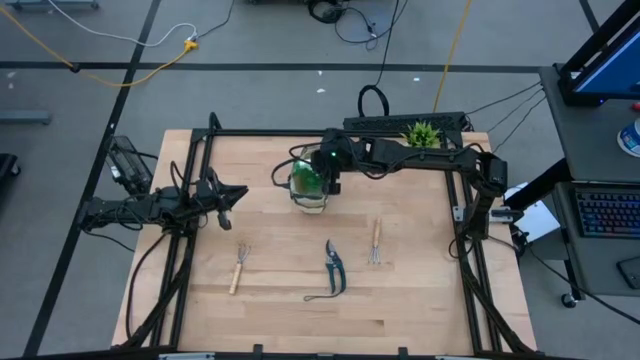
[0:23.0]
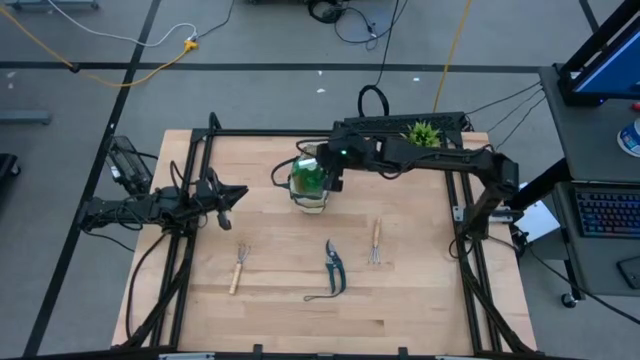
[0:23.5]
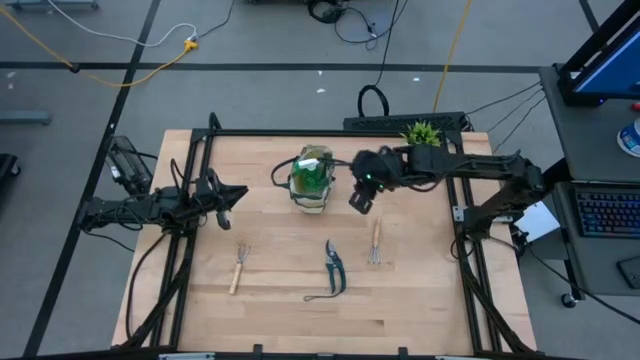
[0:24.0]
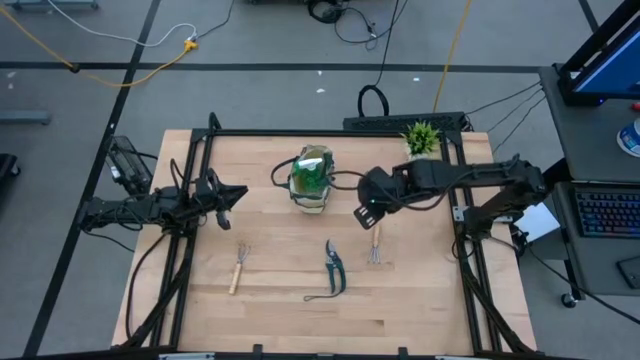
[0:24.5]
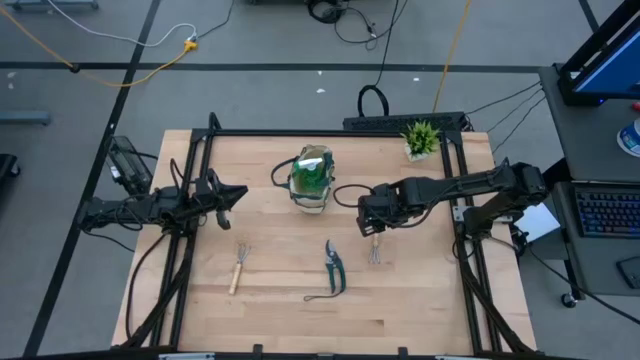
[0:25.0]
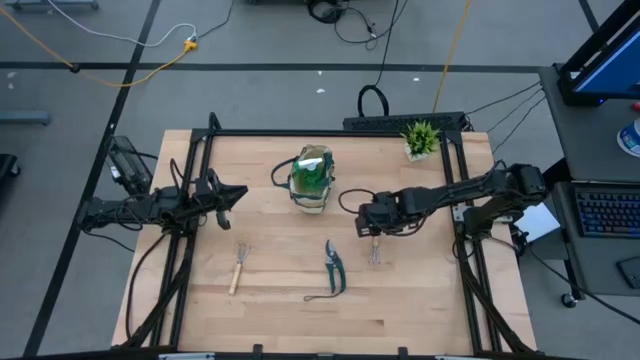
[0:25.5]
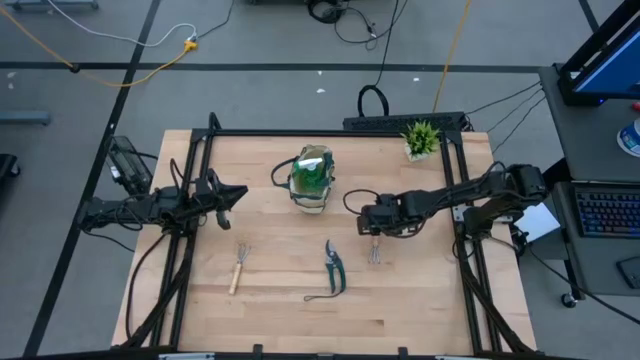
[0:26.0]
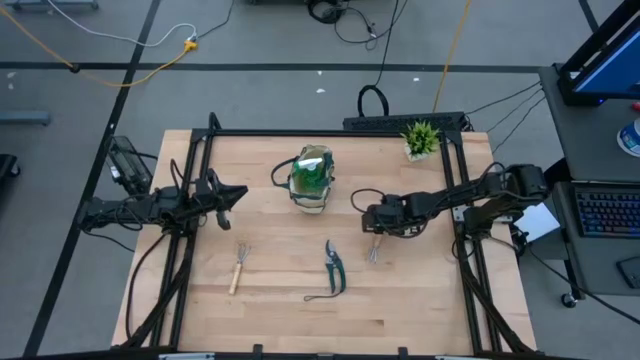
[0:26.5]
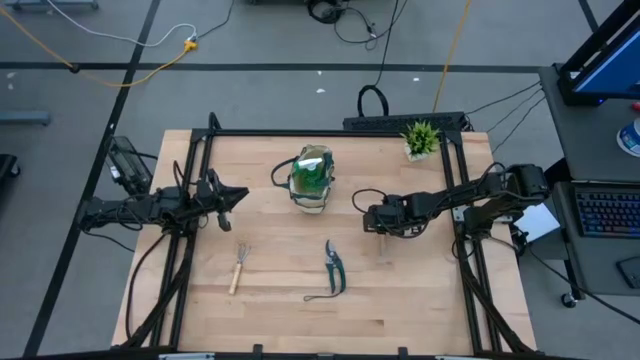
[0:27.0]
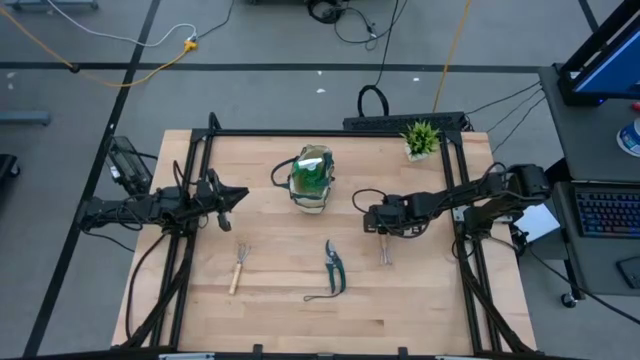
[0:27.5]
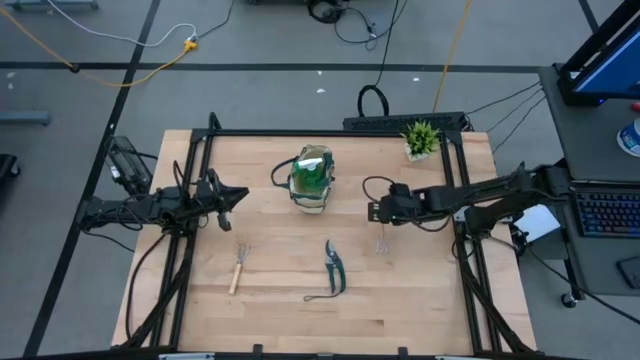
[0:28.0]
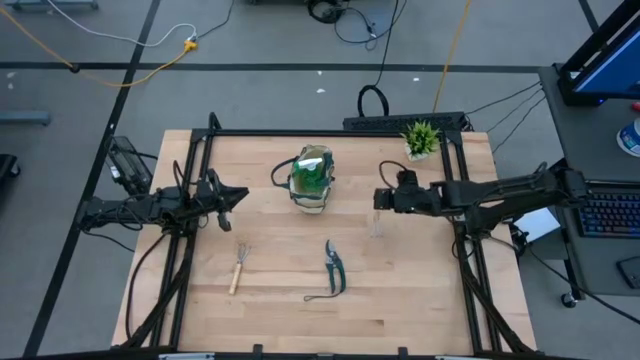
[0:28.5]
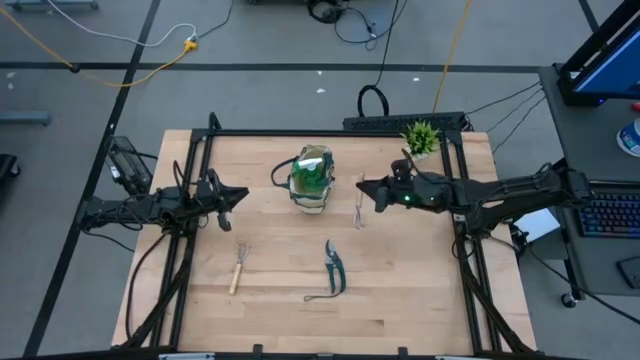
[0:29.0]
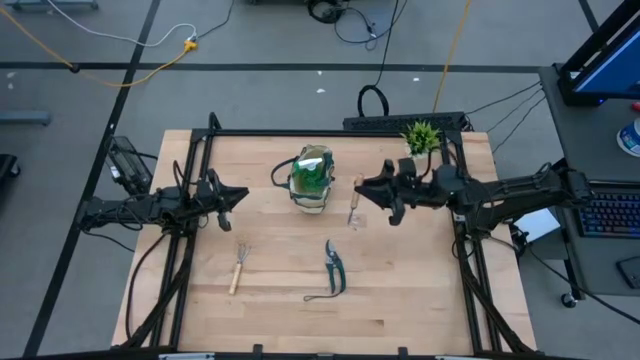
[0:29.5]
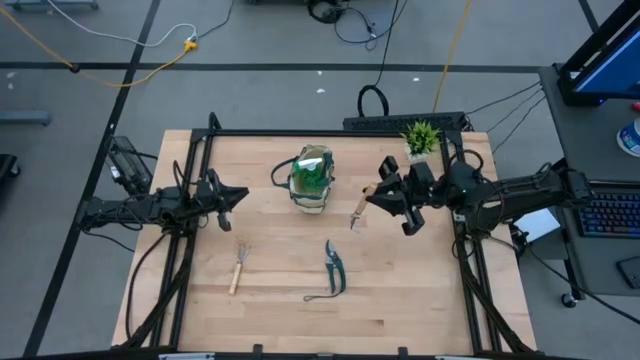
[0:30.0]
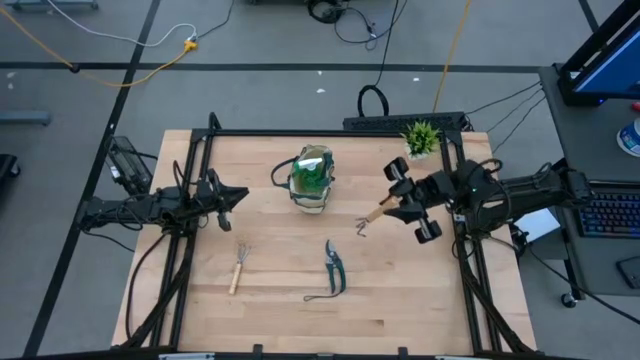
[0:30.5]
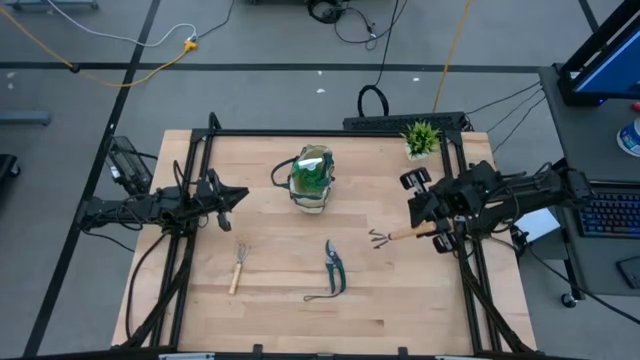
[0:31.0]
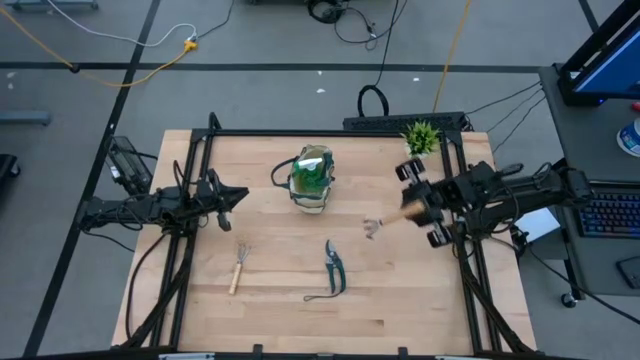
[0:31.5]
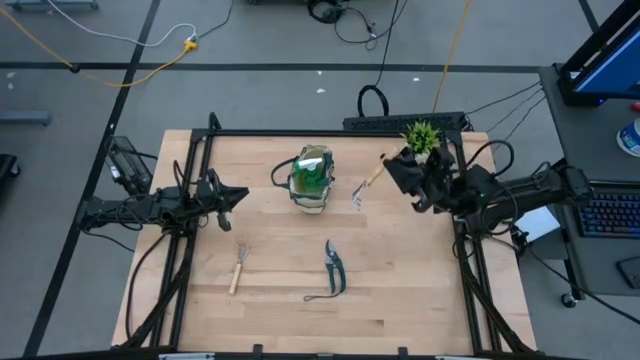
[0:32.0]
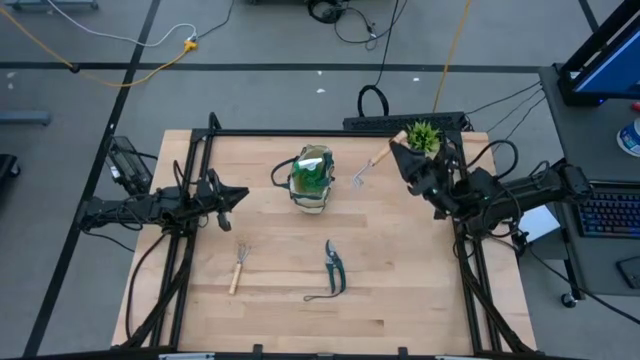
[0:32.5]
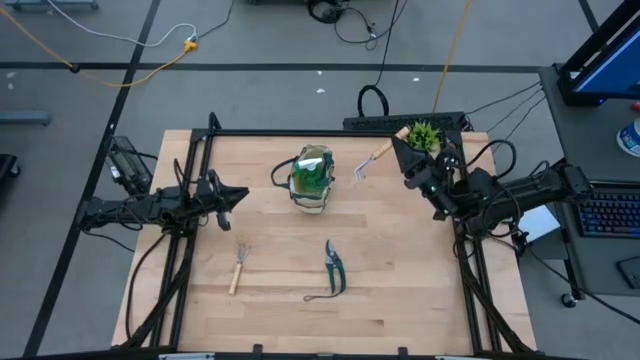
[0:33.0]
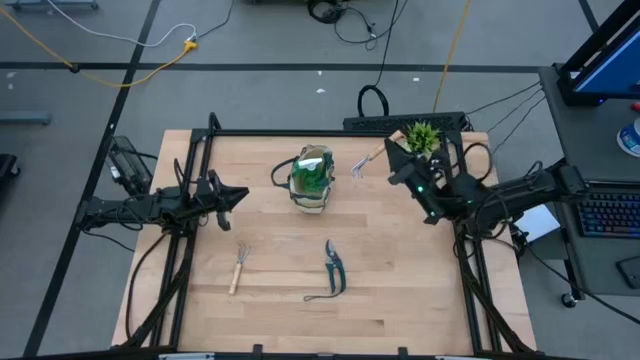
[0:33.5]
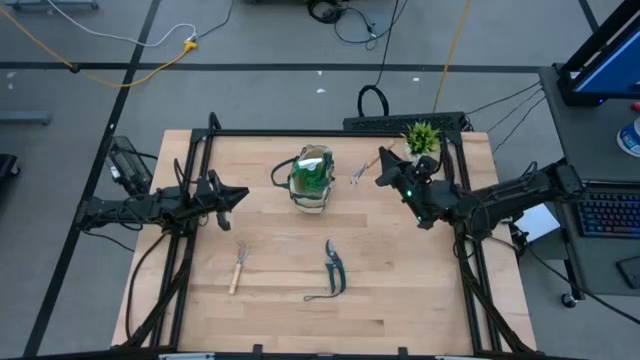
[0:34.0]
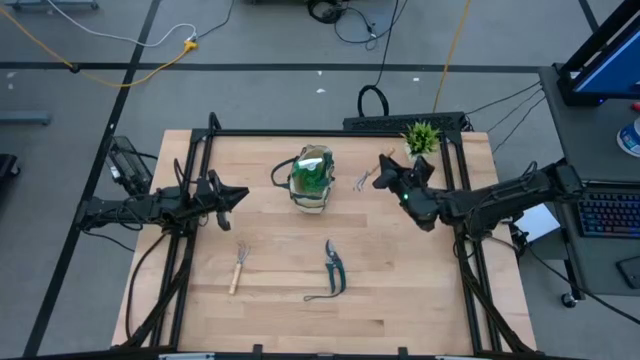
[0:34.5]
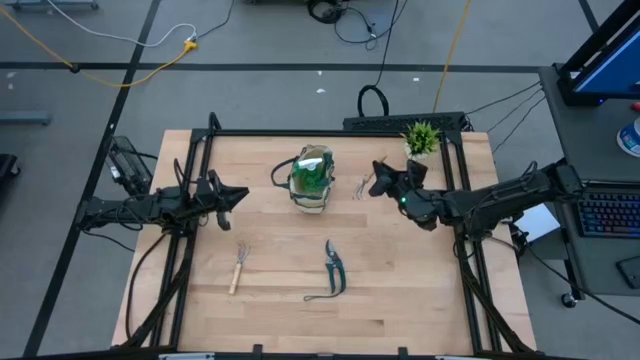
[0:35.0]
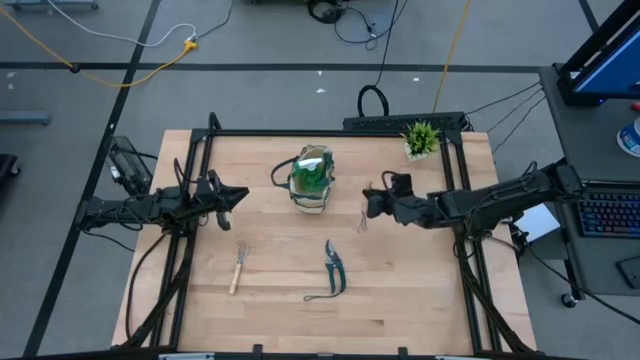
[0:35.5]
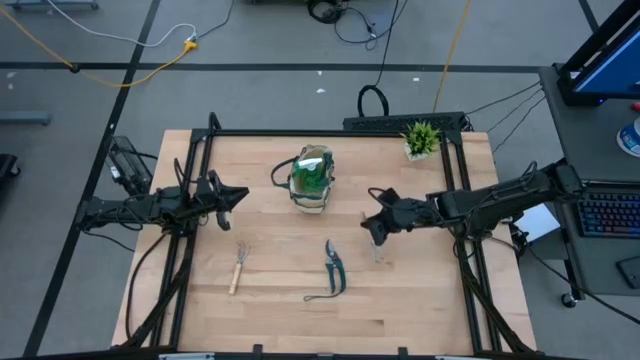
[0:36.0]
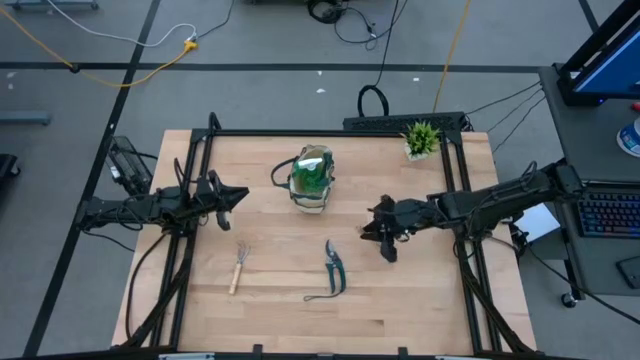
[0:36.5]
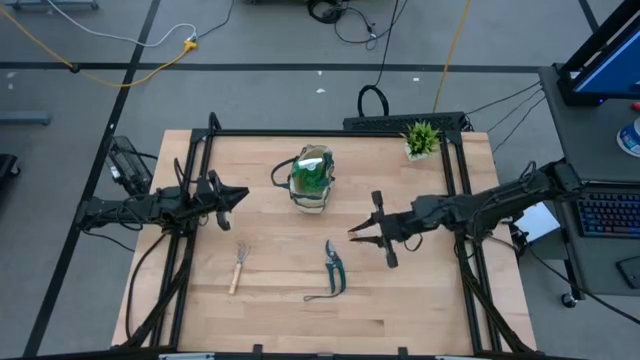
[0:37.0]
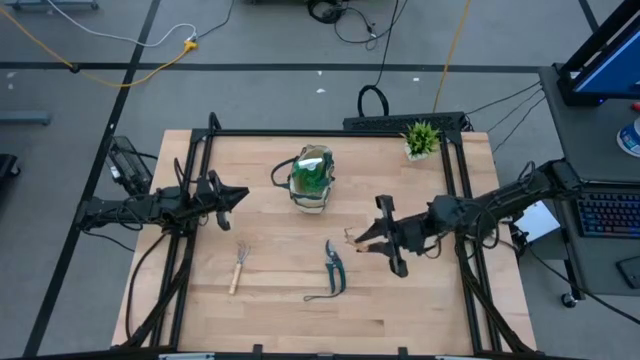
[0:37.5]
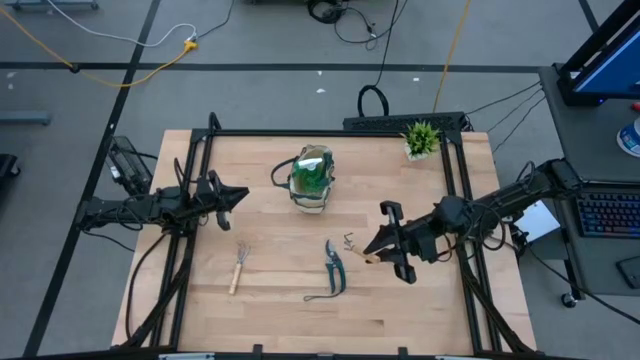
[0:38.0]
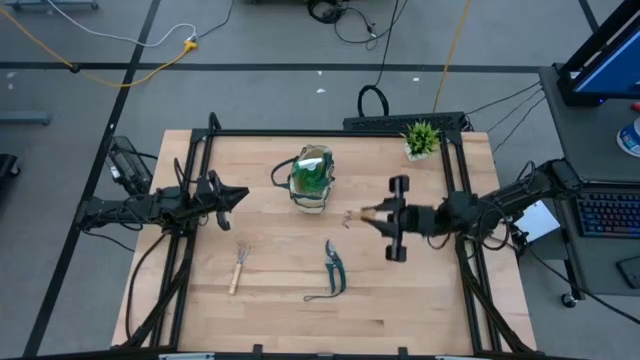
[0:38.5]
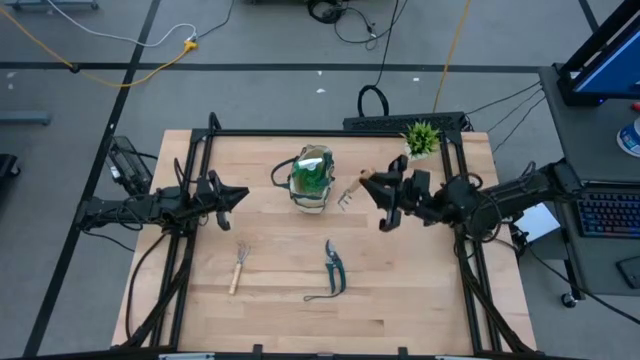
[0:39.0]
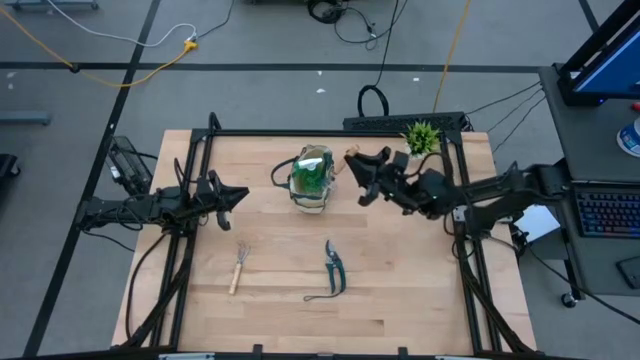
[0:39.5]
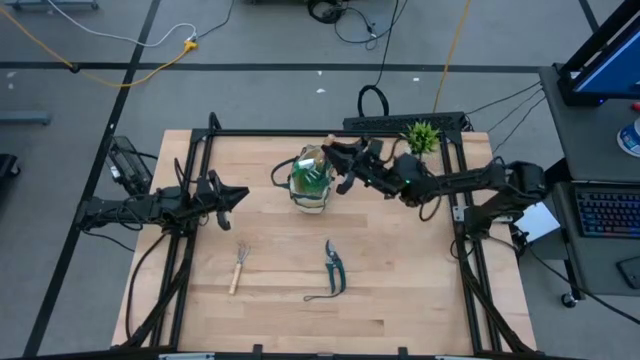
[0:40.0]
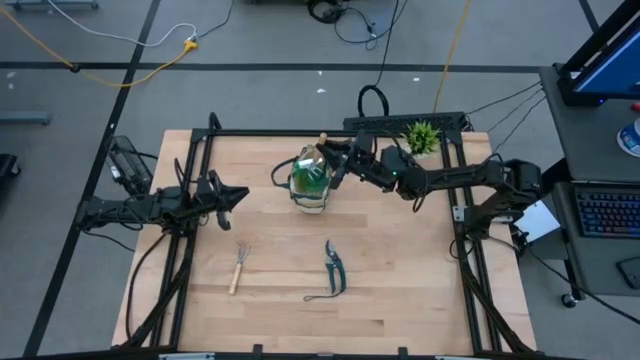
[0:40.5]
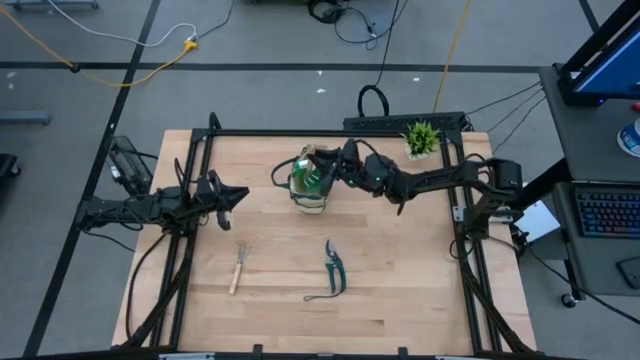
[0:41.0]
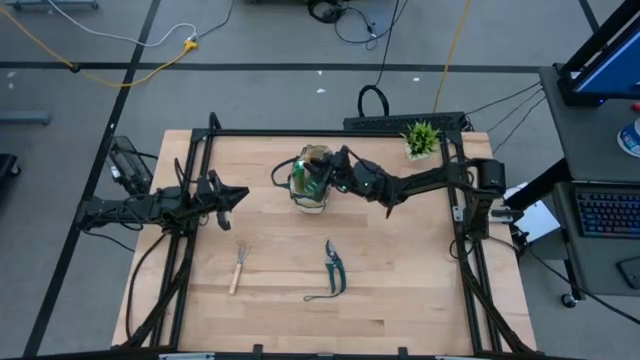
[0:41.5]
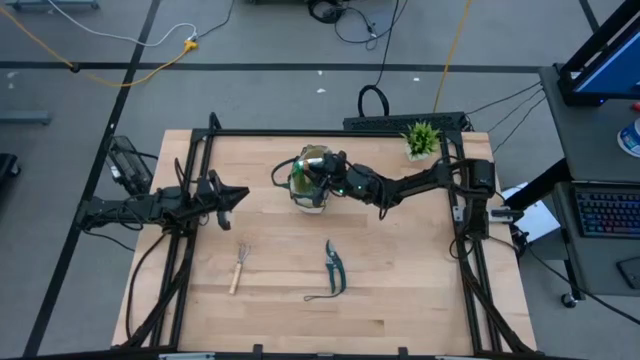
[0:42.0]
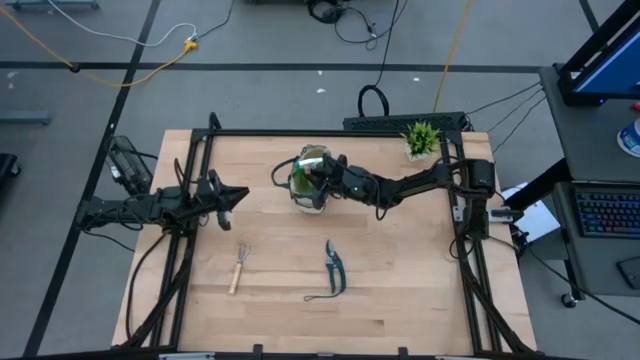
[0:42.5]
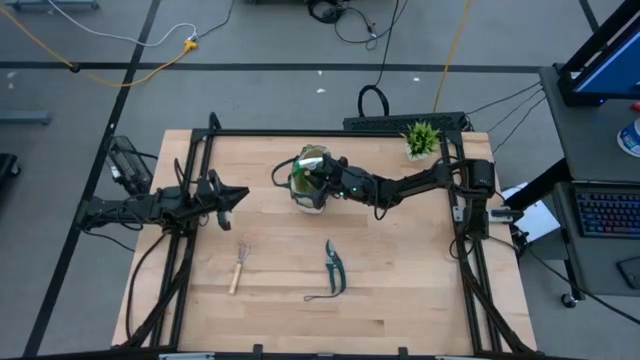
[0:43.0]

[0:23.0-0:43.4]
Task: Pick & Place Garden tools in Gardening bag
Put the right hand rake into the top gardening bag

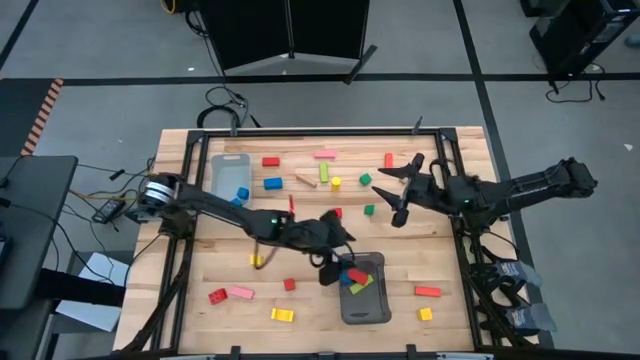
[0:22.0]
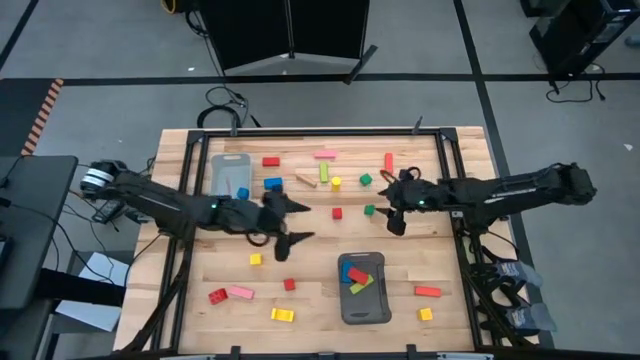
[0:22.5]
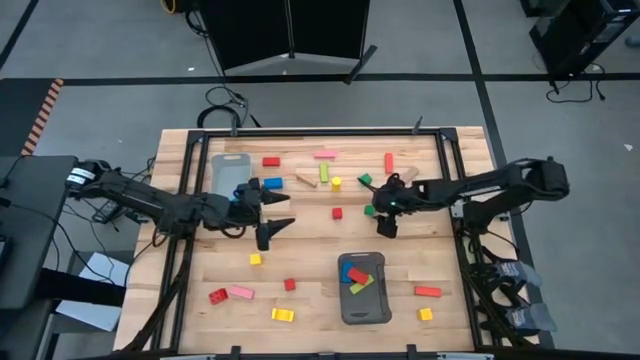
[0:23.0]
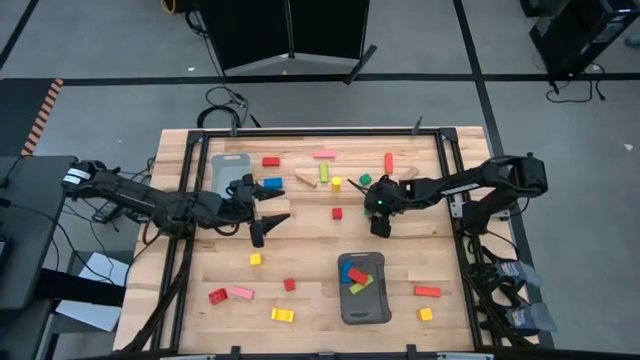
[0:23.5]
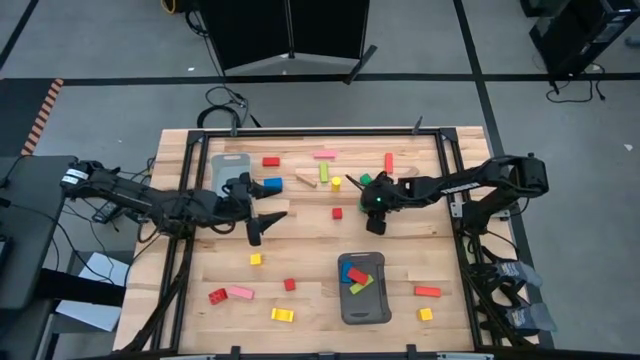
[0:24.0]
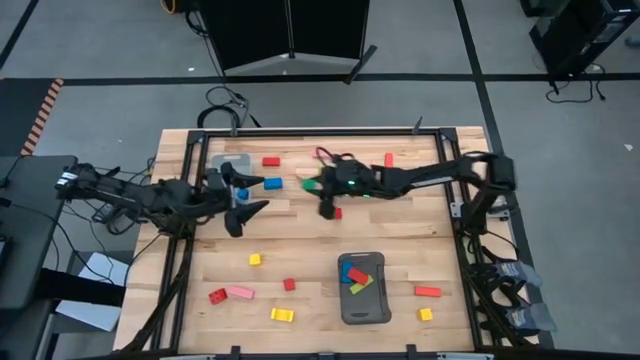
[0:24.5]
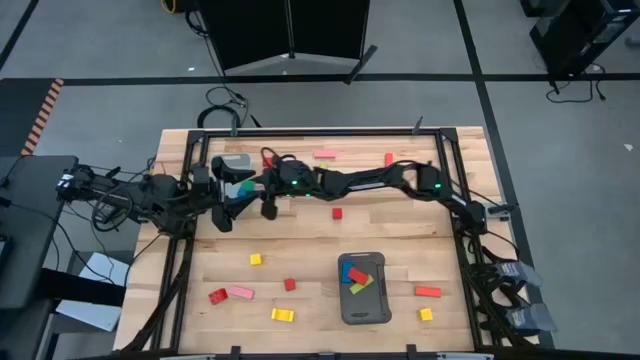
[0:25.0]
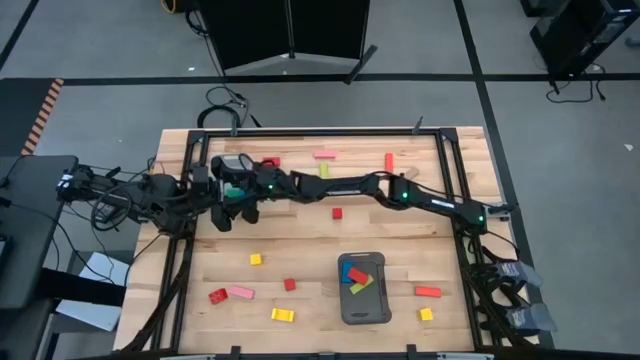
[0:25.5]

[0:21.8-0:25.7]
Task: Sort blocks by size
Put the green triangular block into the gray bin
